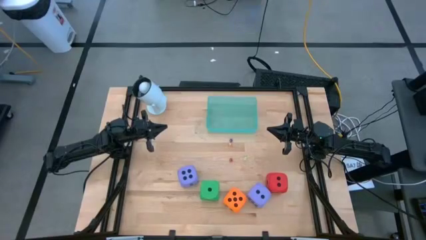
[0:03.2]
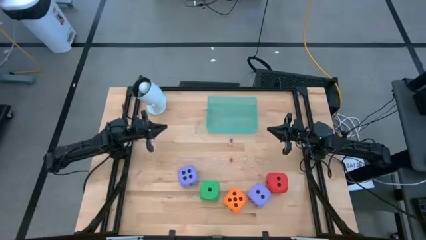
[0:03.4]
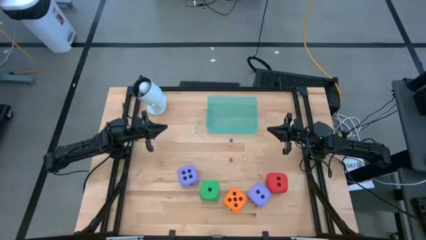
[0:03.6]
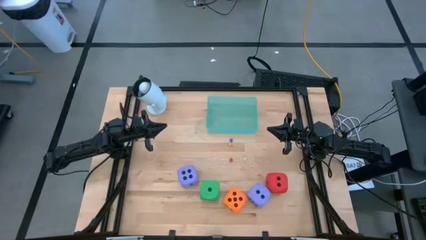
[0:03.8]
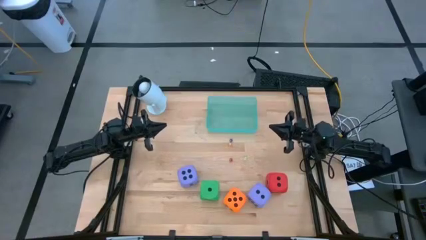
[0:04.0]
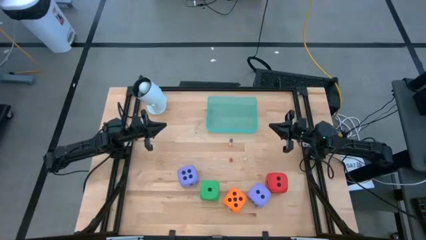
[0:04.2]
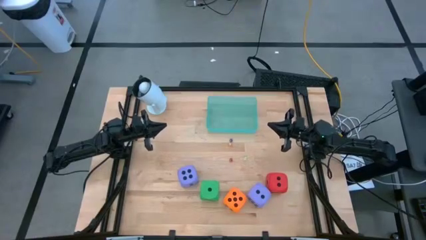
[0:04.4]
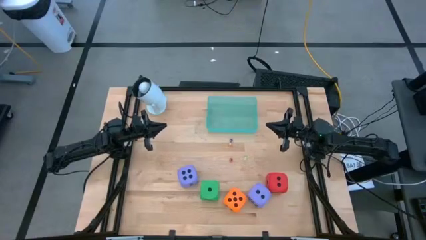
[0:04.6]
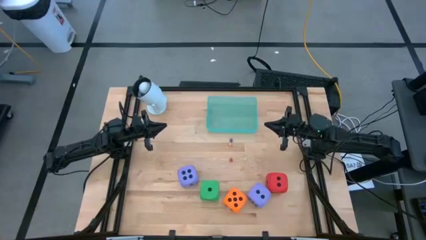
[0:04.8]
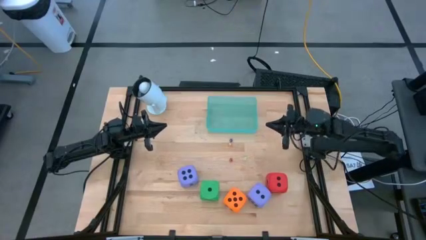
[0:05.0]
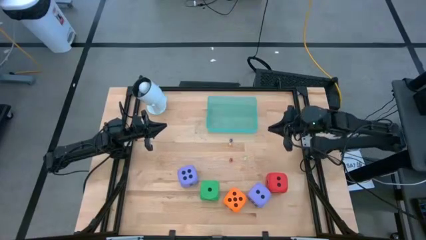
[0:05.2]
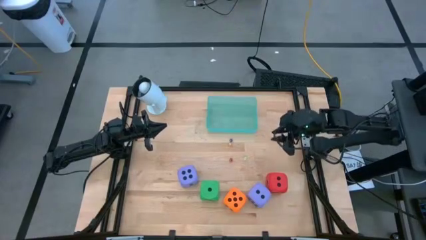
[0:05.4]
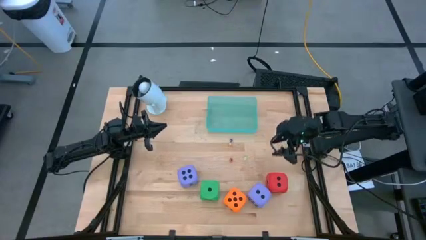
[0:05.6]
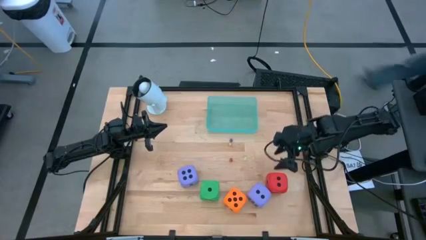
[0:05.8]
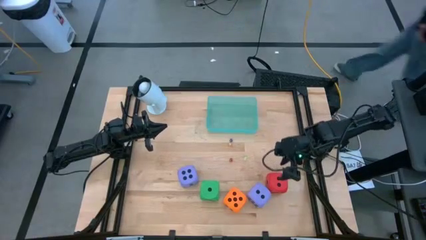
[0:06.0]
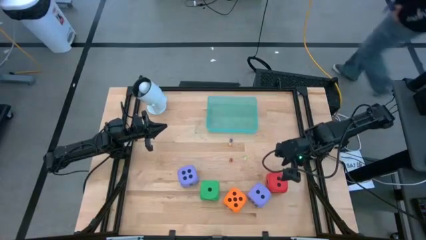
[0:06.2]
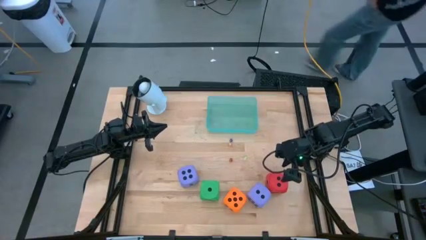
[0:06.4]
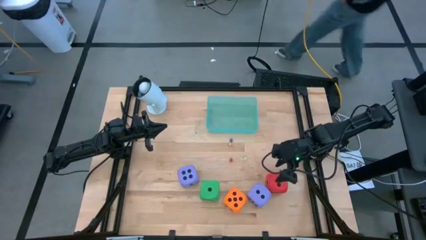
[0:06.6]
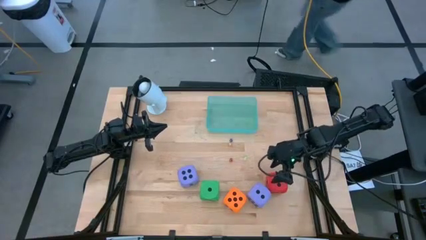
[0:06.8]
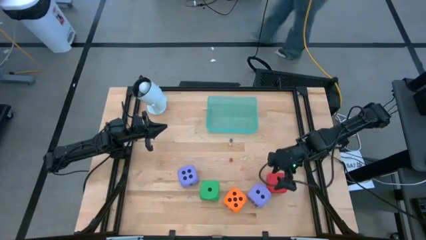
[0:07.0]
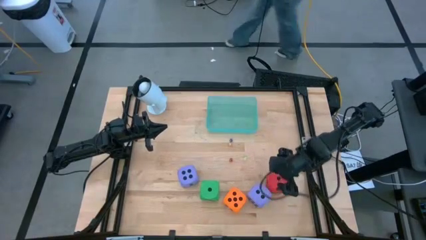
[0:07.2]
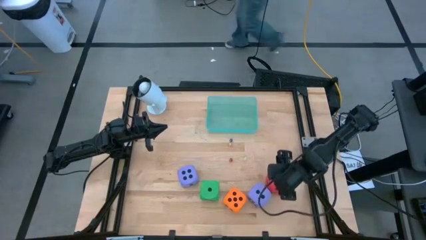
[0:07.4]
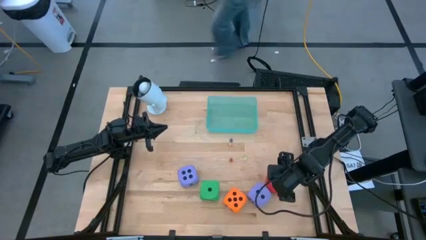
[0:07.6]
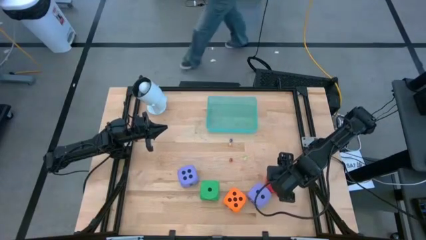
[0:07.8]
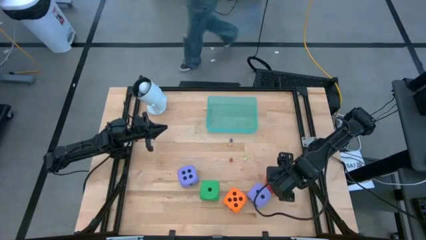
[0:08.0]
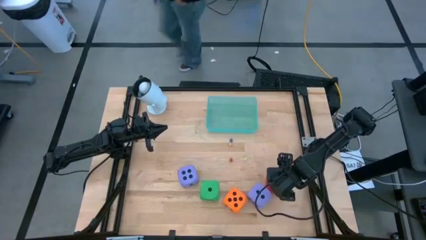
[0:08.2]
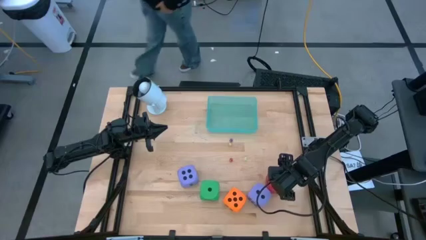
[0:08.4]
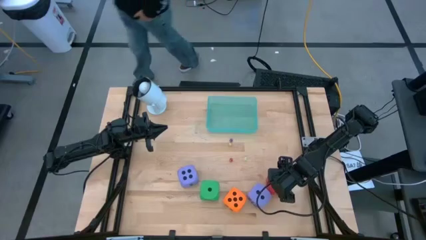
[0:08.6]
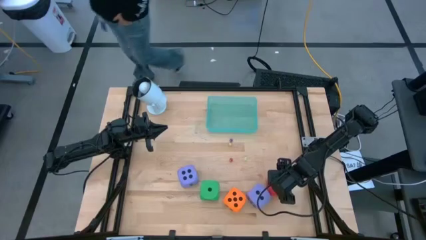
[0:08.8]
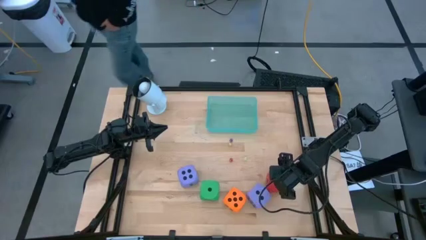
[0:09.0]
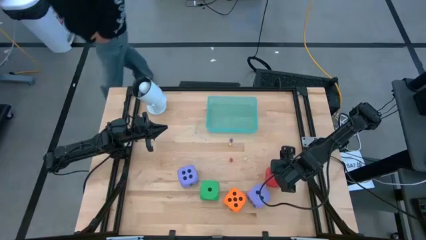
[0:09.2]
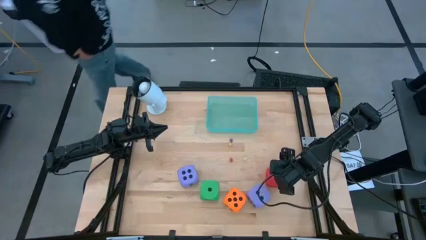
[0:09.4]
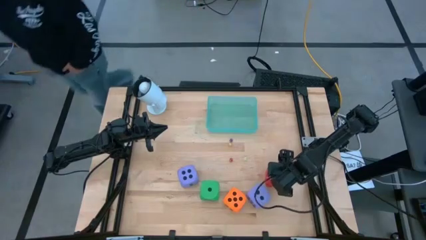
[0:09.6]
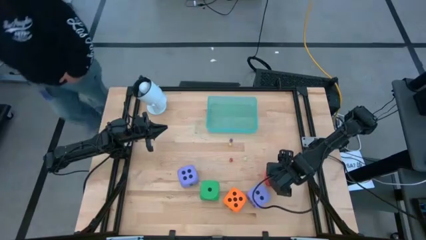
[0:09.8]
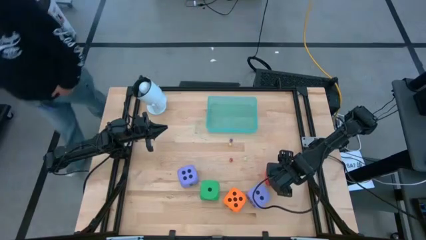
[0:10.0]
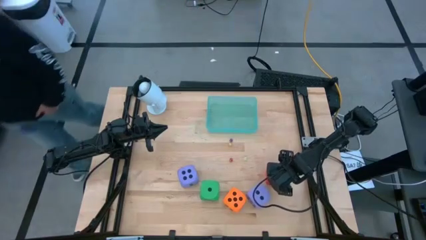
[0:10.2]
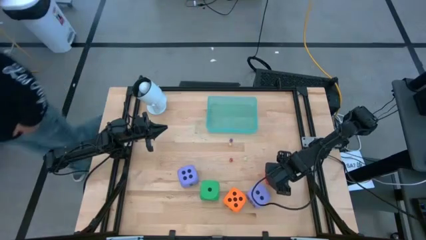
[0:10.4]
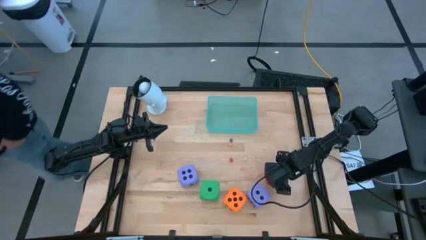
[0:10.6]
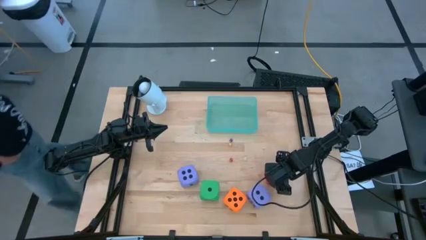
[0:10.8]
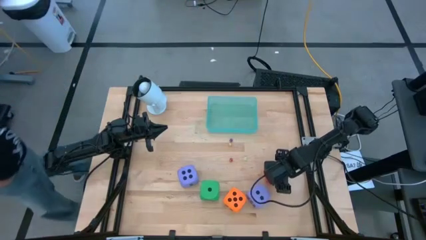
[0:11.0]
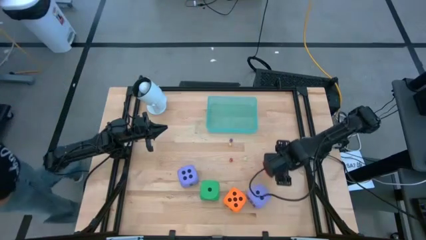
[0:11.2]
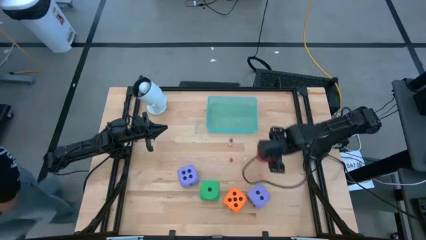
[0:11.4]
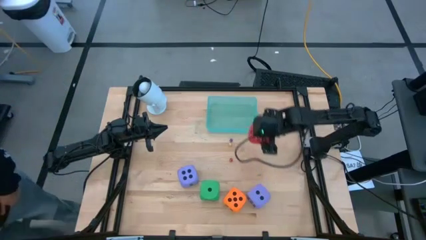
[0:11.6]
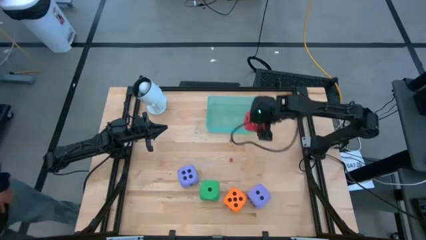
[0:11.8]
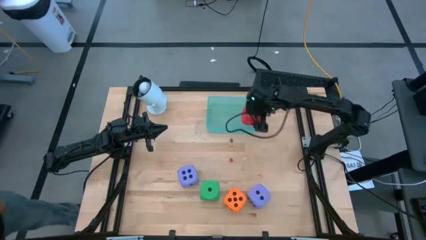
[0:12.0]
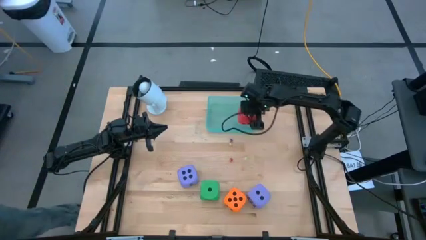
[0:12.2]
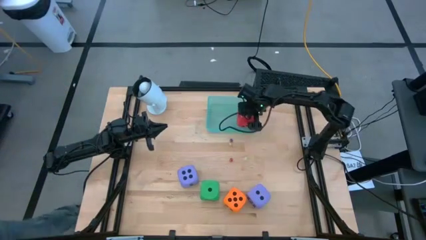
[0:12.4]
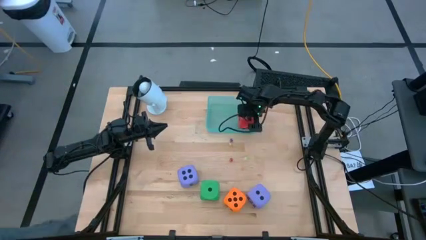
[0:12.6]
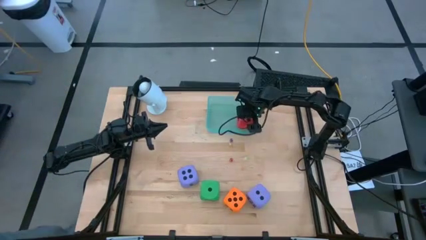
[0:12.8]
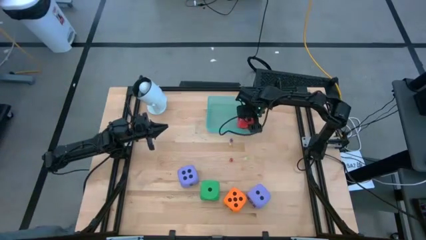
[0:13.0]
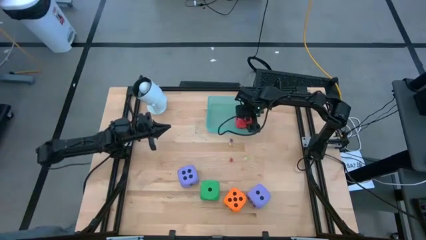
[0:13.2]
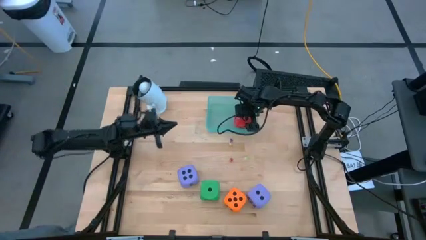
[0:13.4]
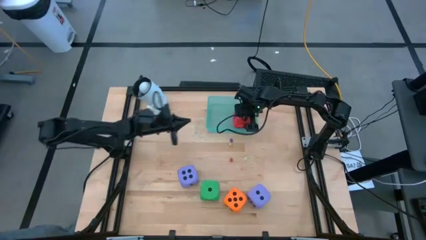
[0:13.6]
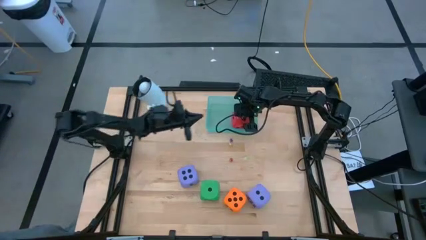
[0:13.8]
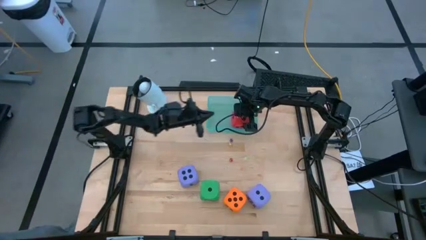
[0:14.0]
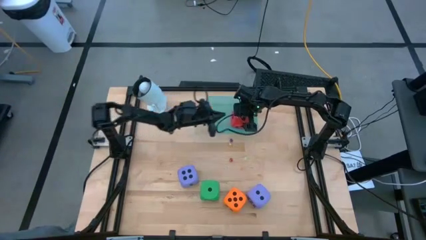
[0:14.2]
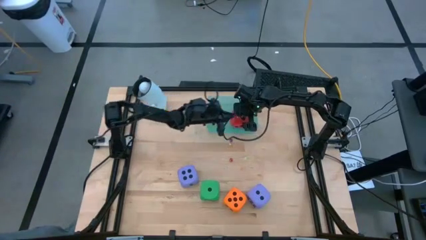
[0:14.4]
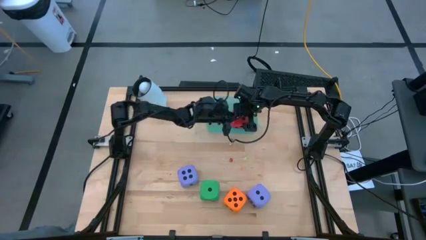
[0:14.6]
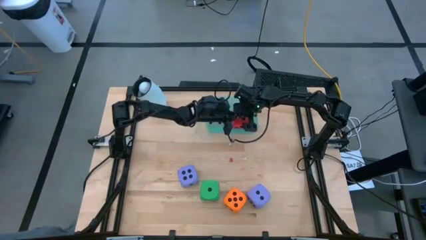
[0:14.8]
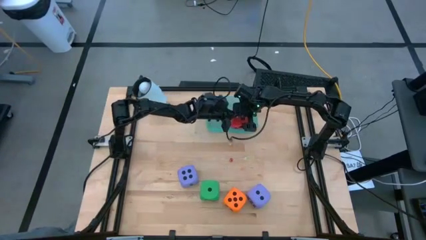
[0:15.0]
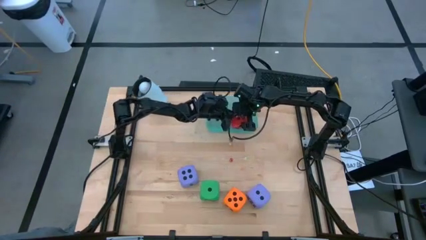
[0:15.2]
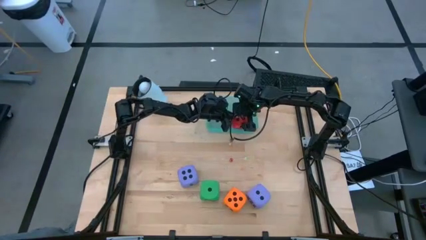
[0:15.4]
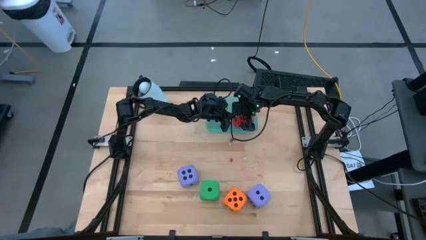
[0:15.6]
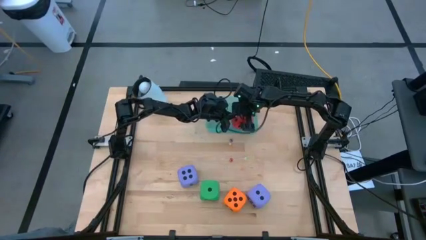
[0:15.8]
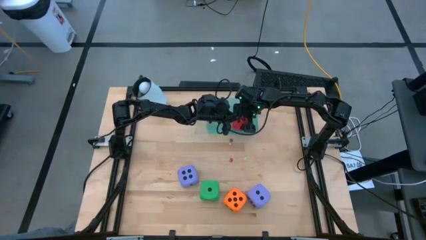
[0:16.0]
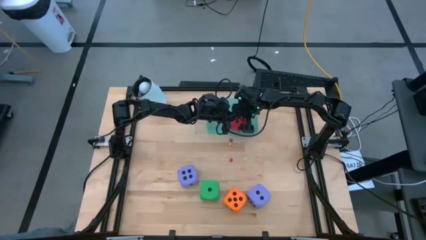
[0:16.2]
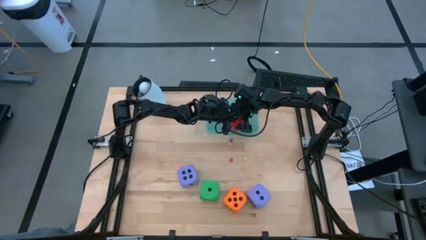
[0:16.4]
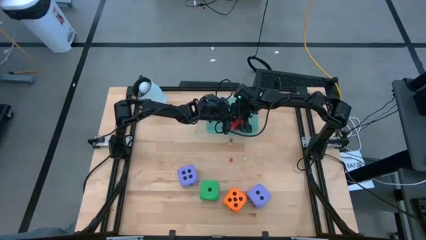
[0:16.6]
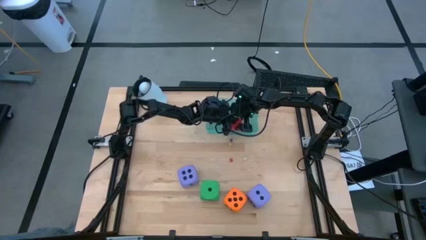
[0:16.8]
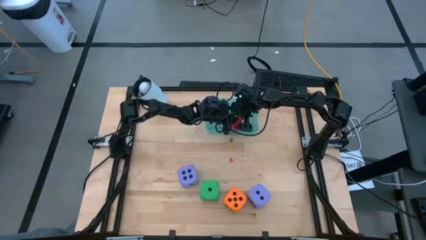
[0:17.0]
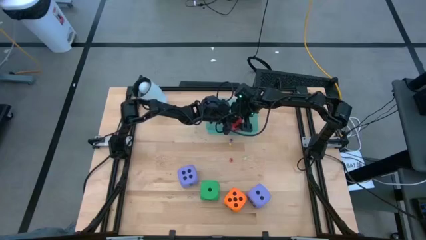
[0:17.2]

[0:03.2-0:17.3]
Task: Pick & Place Dice
Put the large red die into the blue bin
